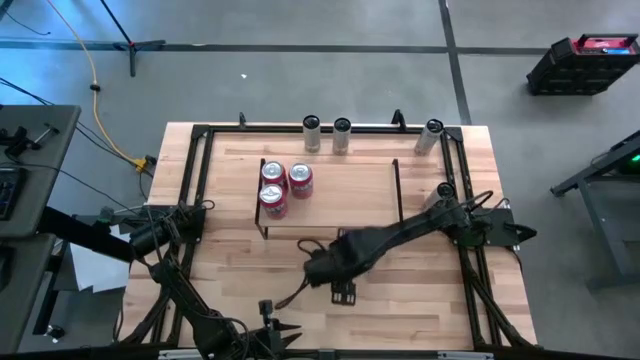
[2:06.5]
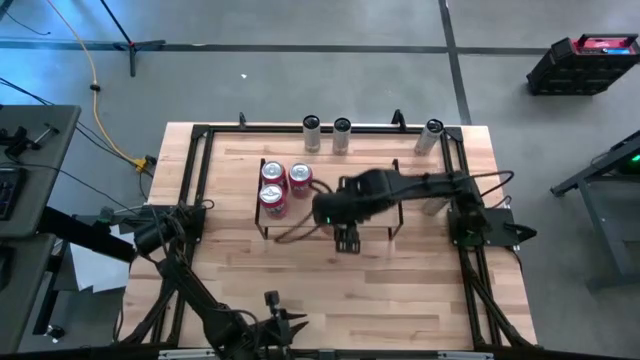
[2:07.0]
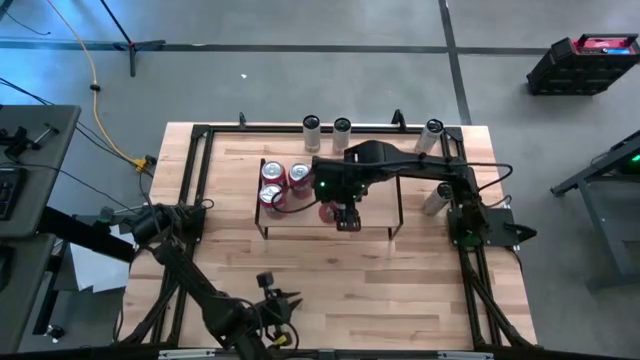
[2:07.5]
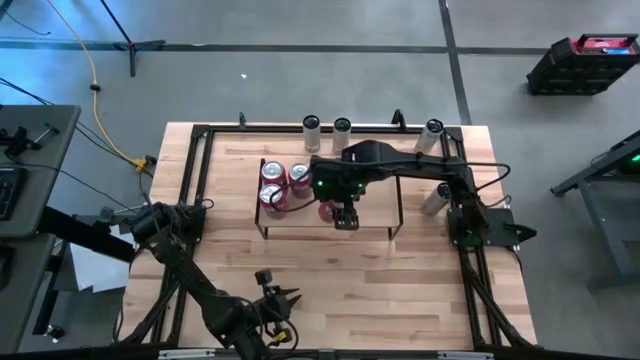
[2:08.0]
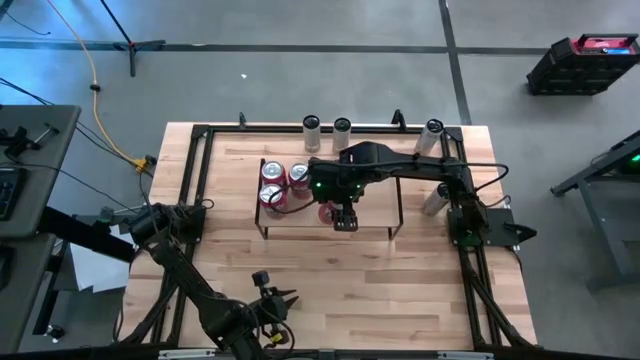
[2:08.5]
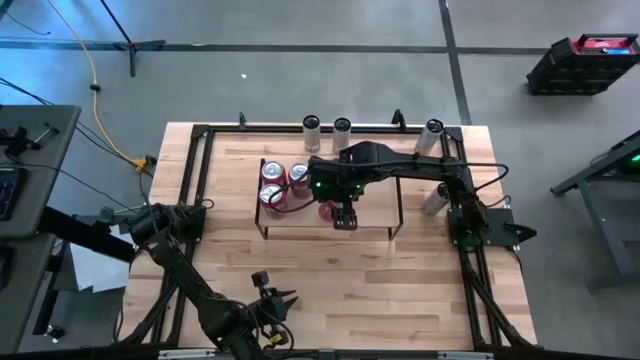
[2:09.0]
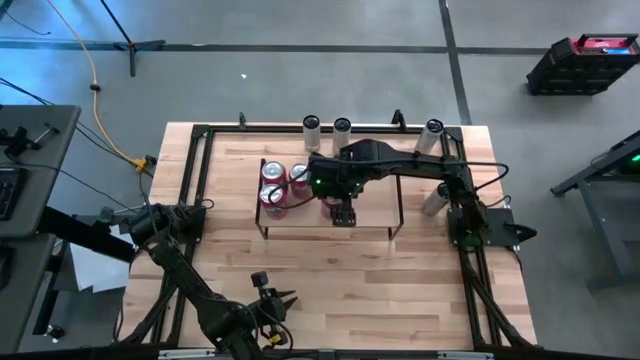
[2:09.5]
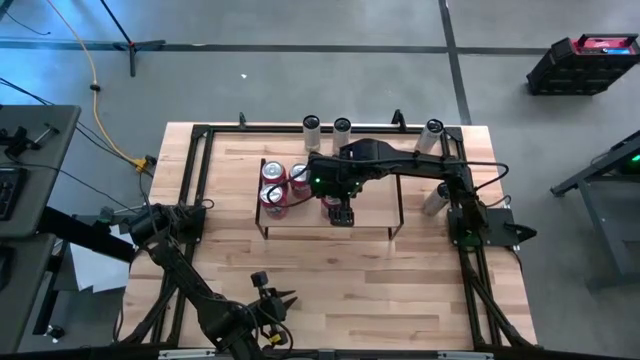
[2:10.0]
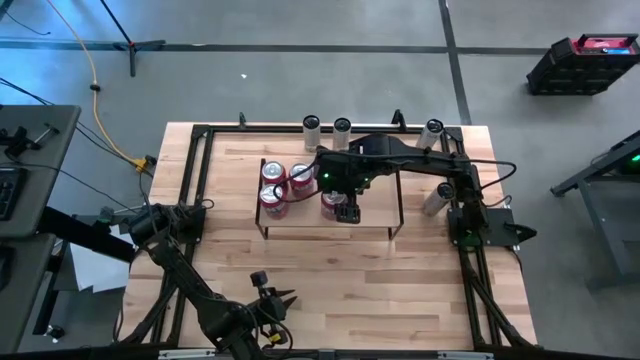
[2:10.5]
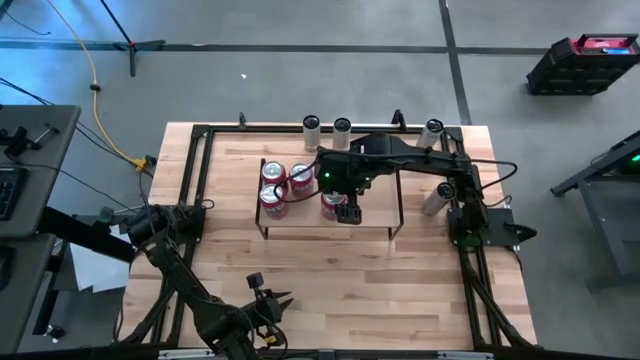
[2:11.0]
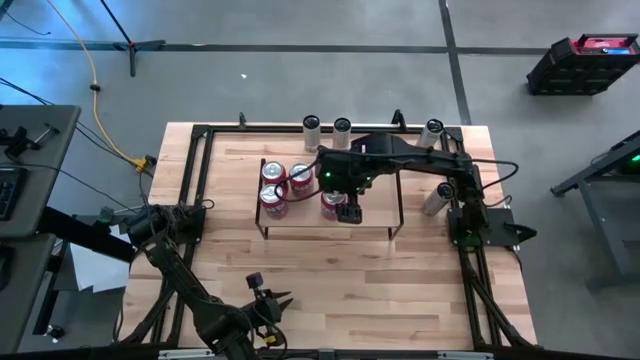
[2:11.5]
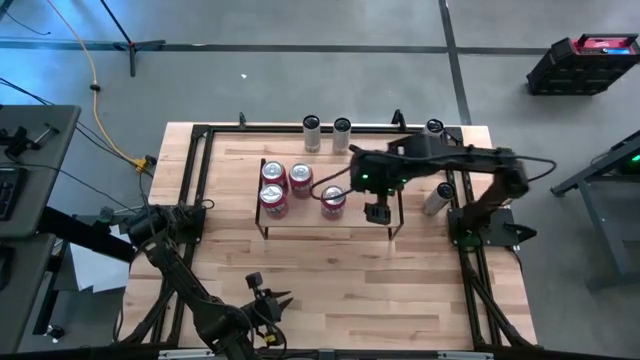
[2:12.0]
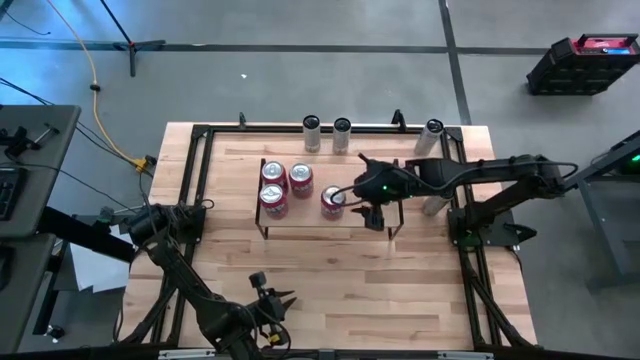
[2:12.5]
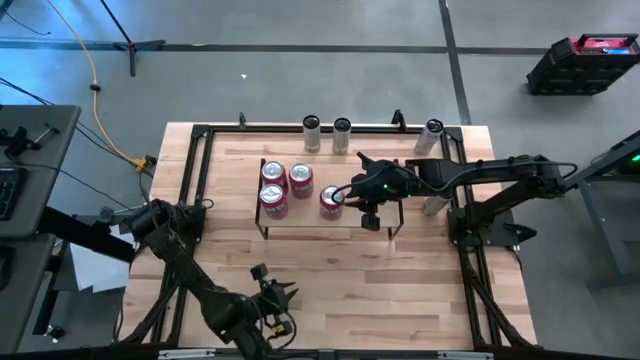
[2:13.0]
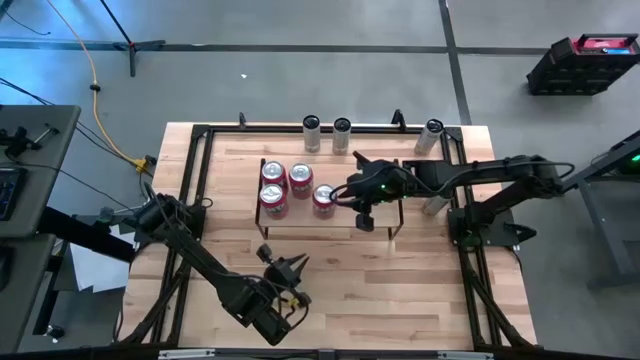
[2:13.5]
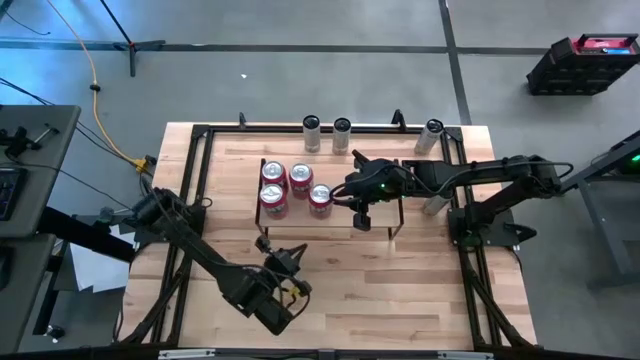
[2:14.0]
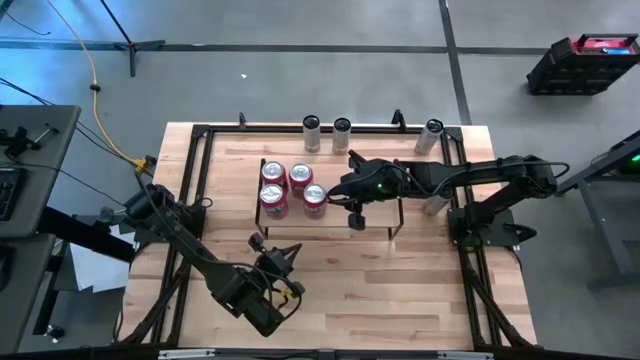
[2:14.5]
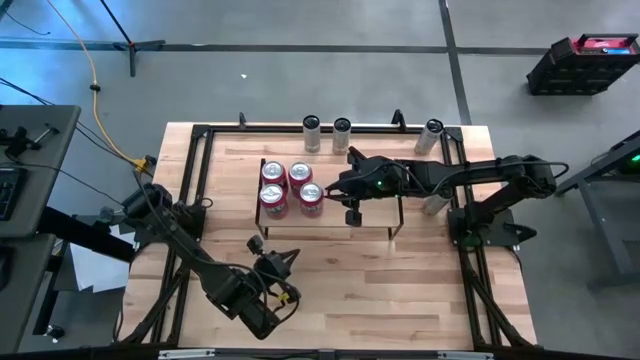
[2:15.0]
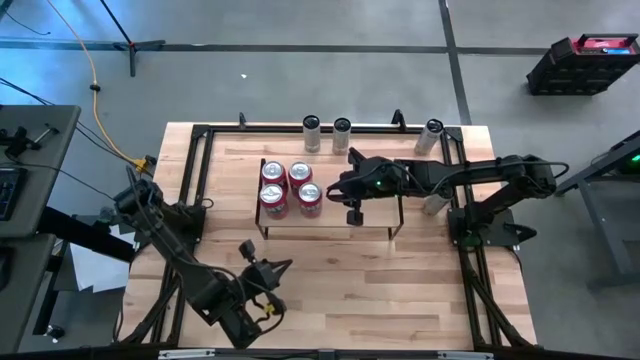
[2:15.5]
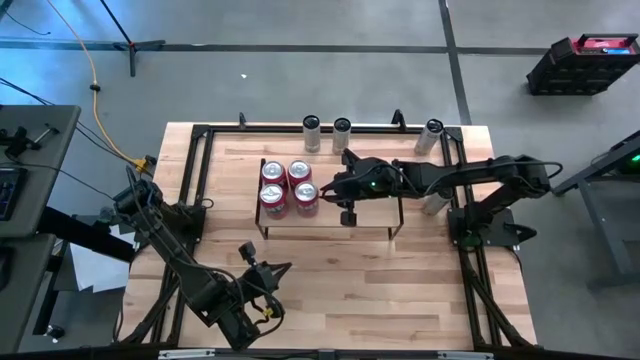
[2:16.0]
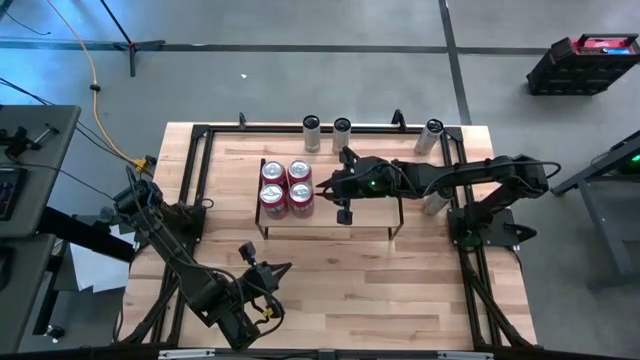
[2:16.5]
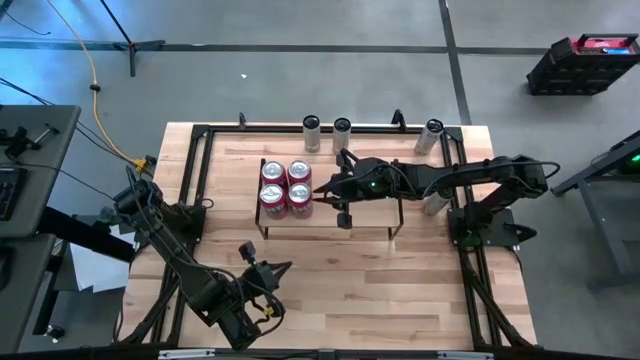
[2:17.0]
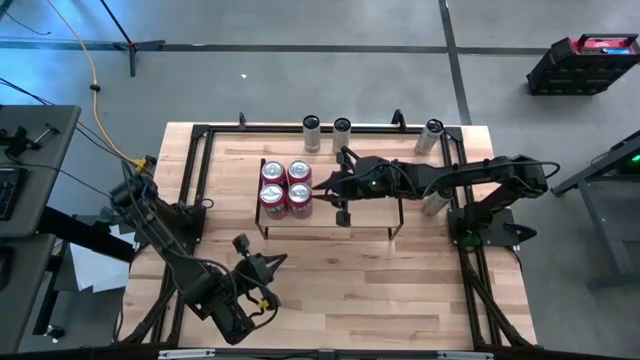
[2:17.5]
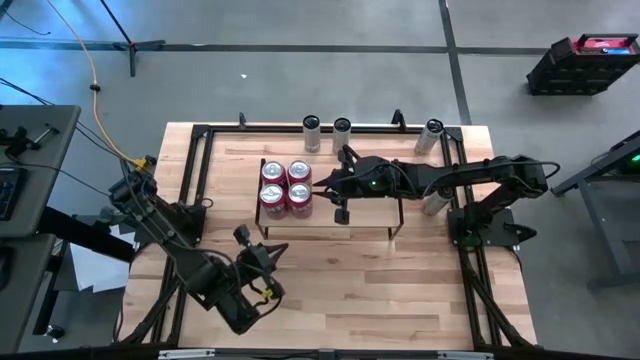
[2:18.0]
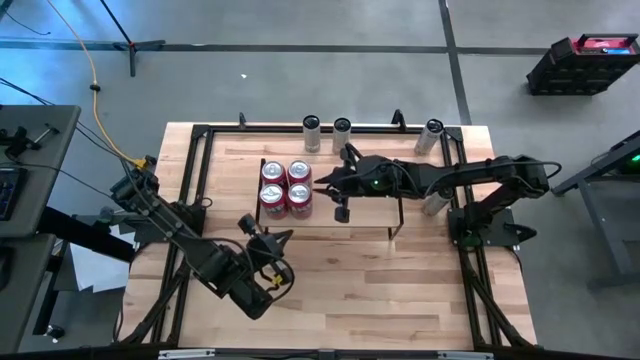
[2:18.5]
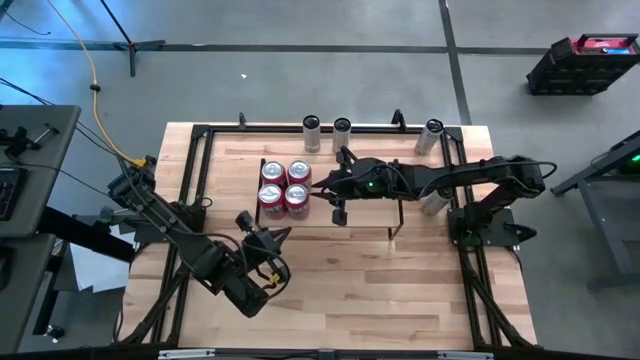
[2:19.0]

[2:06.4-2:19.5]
Task: Place canned beverage on shelf
Put the red soda can on the shelf aligned with the other red soda can

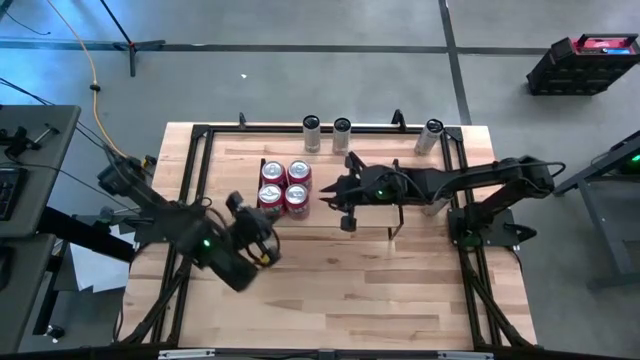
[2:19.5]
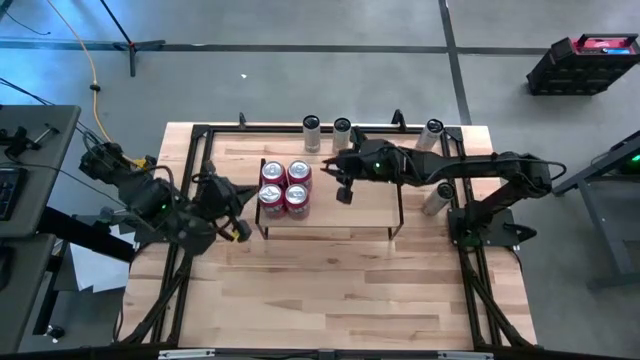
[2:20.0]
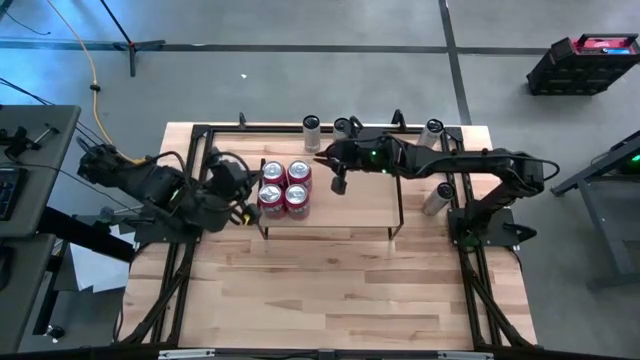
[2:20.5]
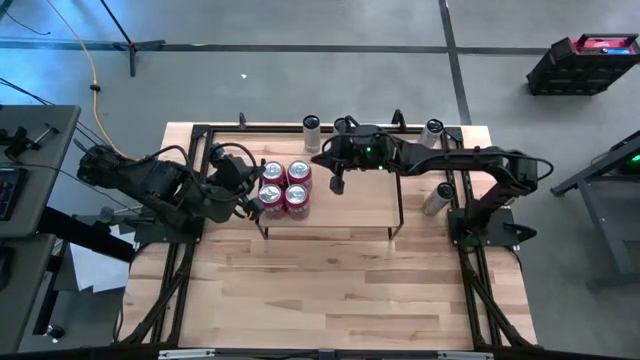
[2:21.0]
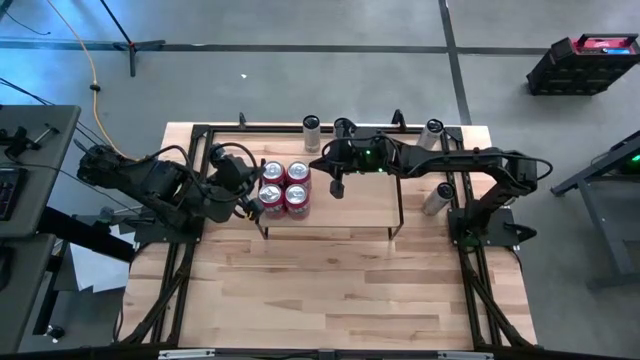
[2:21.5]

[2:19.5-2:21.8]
Adjust the red soda can on the shelf

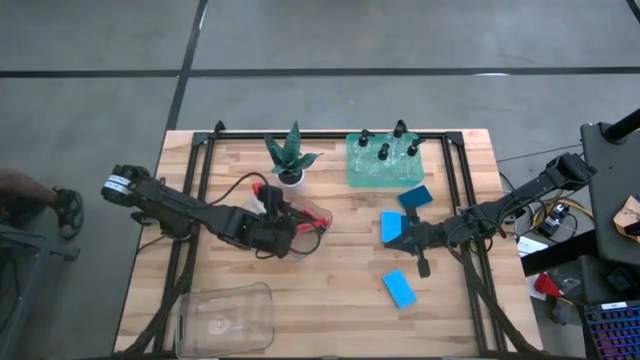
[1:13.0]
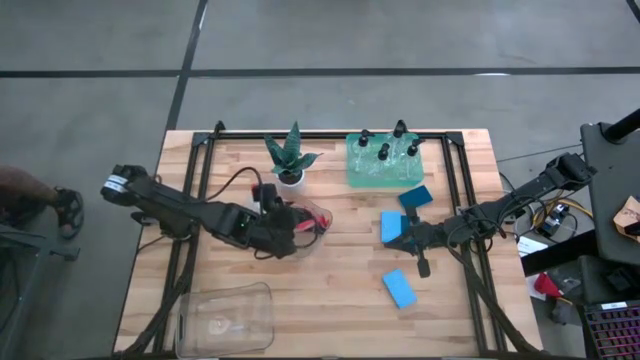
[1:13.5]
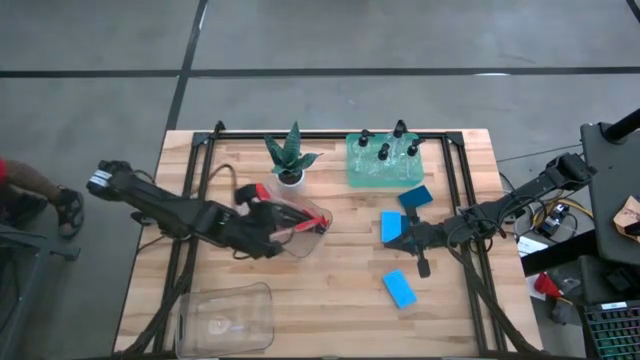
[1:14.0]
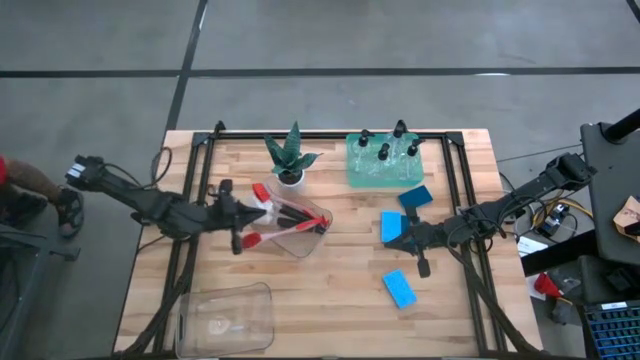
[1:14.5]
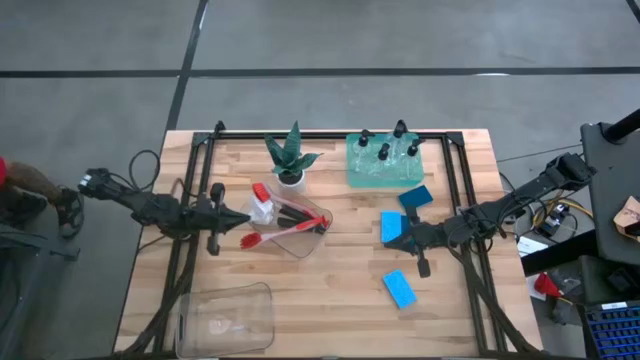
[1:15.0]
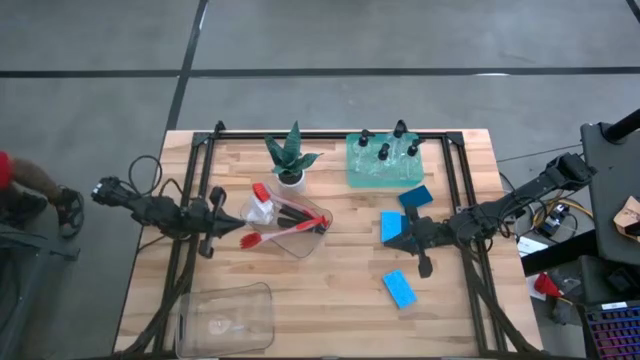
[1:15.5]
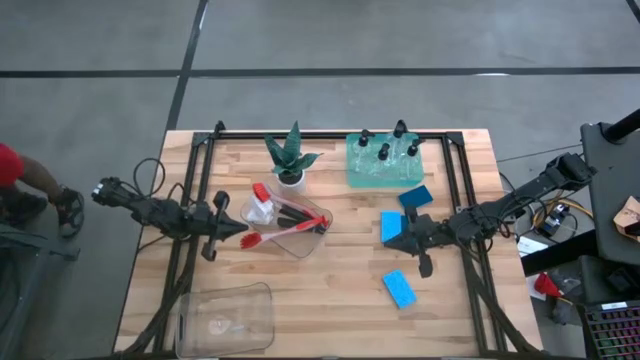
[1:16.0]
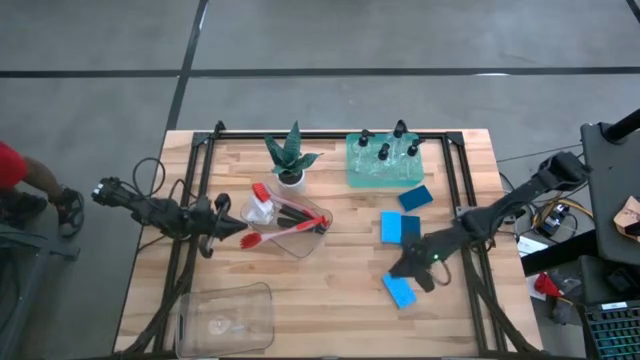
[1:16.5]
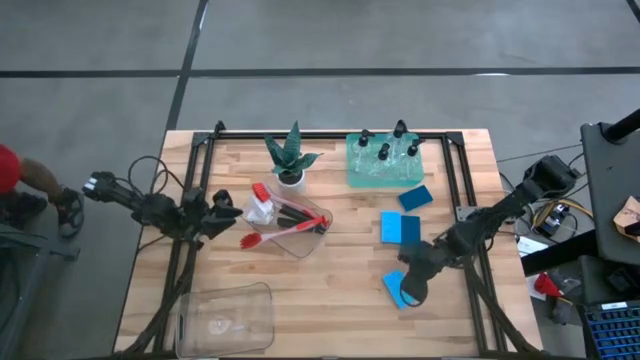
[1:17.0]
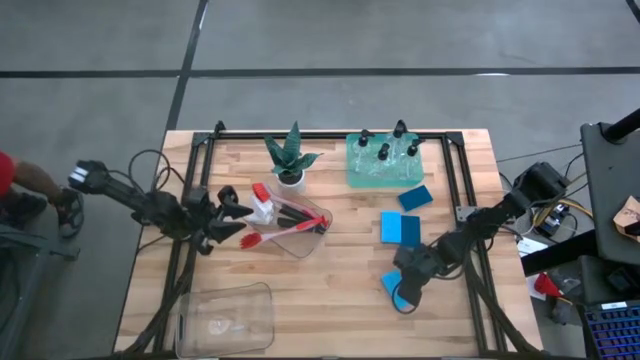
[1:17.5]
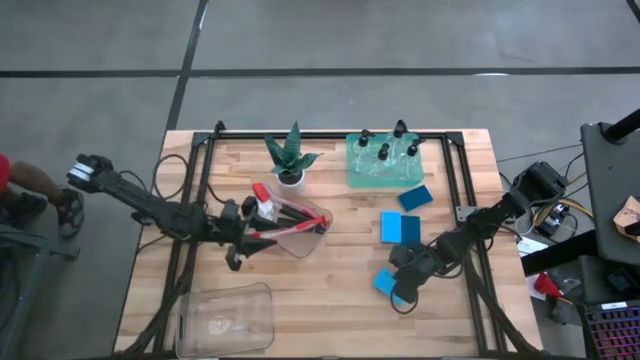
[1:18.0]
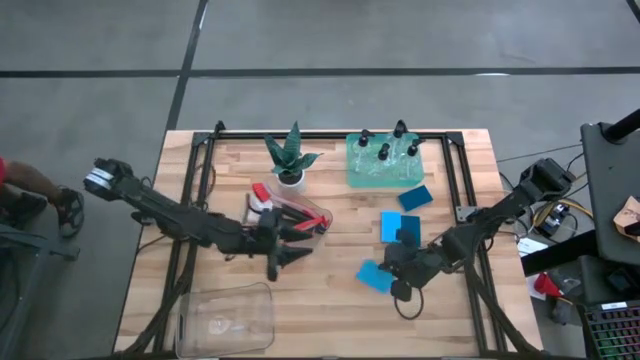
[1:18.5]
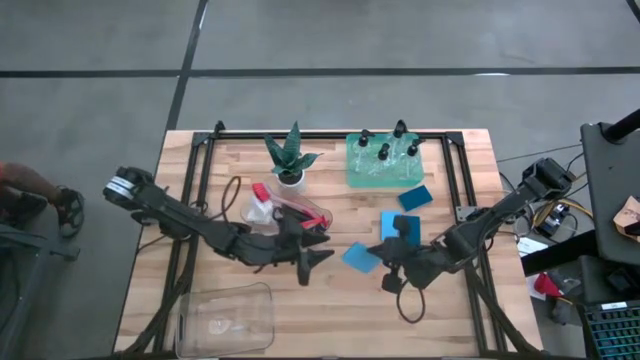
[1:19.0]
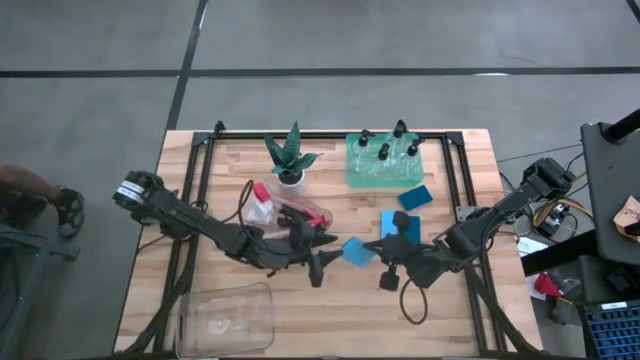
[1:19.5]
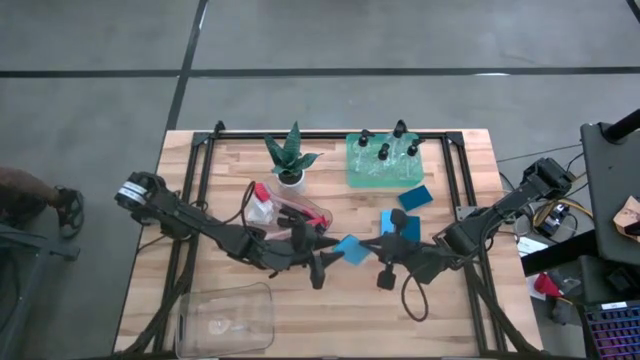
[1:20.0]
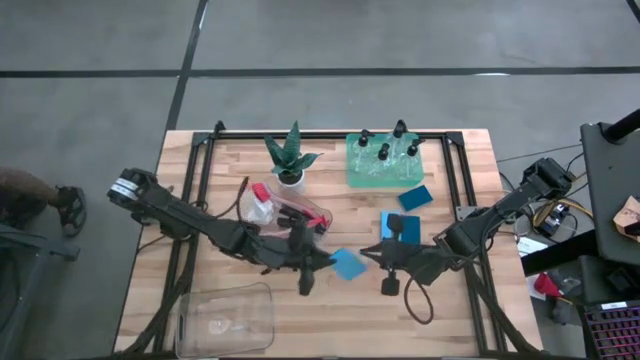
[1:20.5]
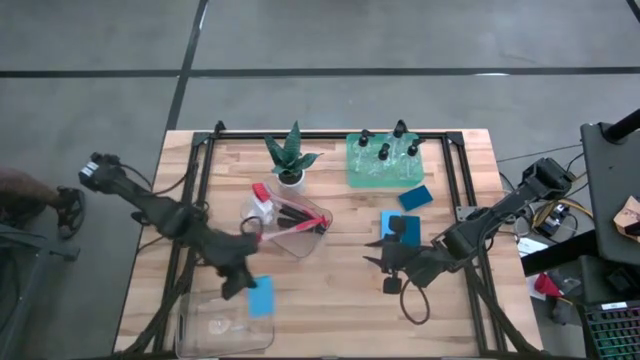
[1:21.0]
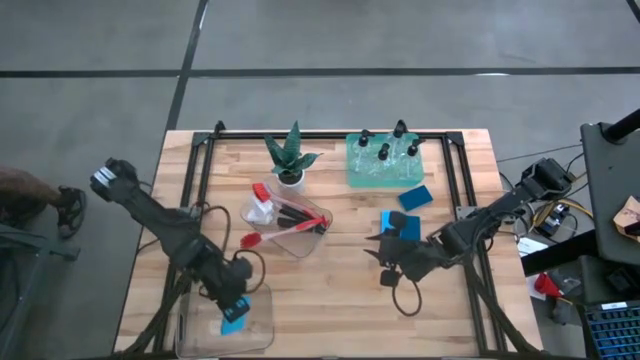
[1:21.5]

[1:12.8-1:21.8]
Task: Pick & Place Kitchen Sink Supplies
Put the blue sponge into the bottom transparent bin
